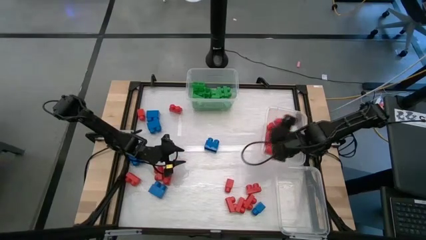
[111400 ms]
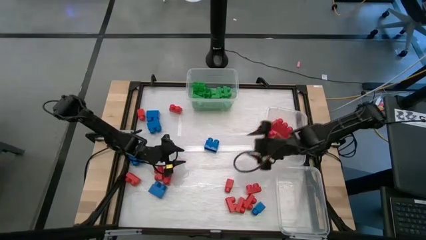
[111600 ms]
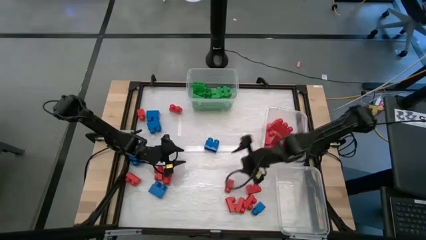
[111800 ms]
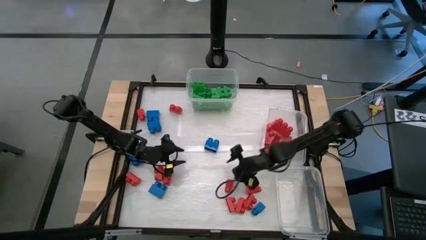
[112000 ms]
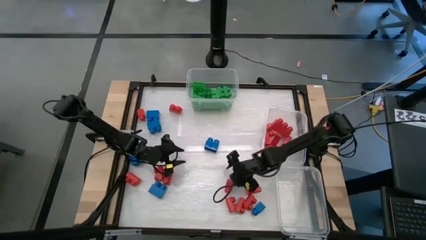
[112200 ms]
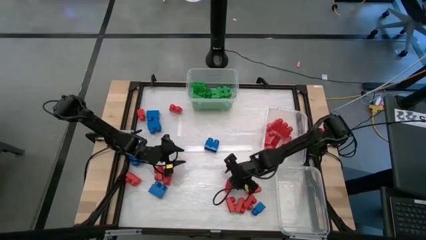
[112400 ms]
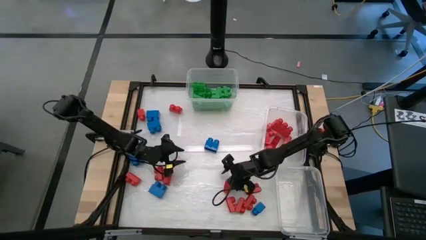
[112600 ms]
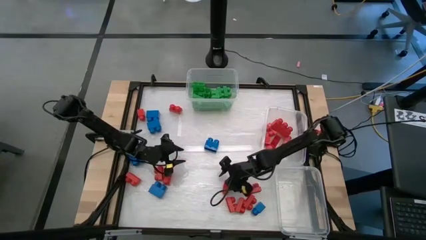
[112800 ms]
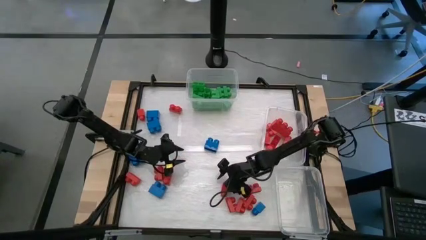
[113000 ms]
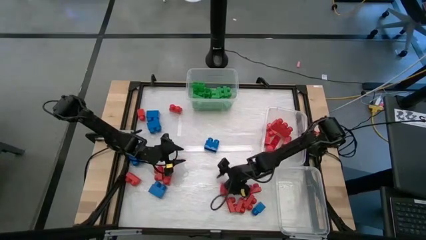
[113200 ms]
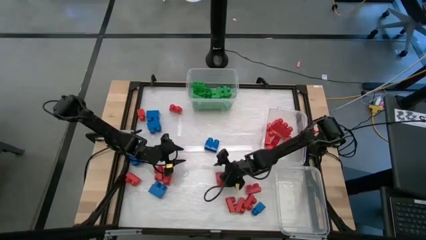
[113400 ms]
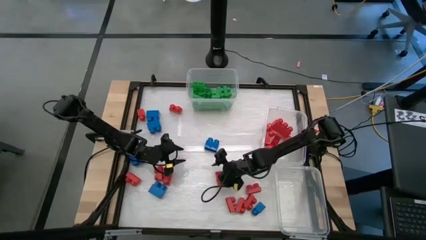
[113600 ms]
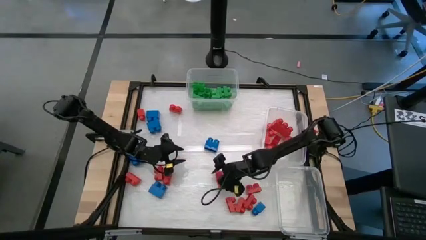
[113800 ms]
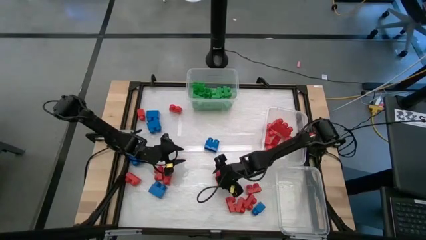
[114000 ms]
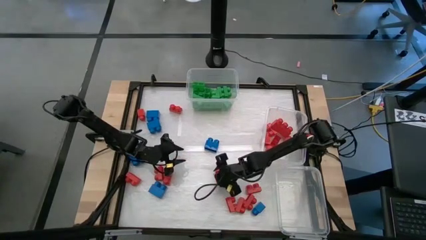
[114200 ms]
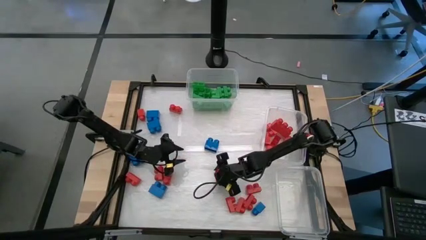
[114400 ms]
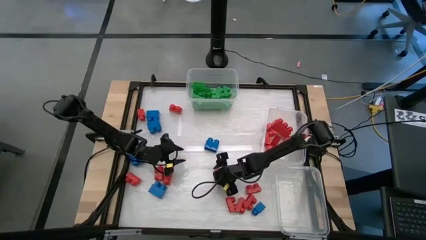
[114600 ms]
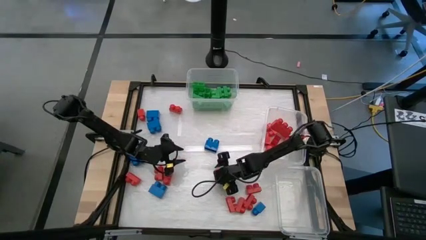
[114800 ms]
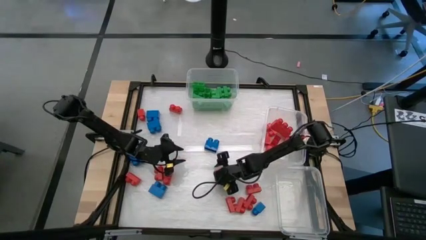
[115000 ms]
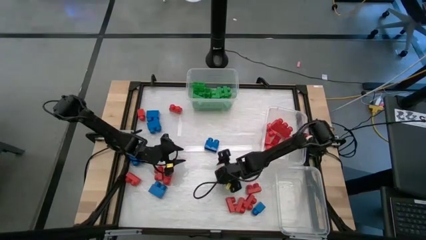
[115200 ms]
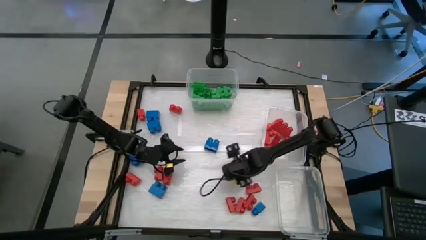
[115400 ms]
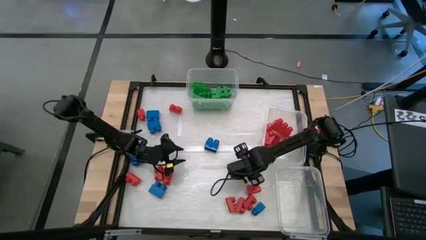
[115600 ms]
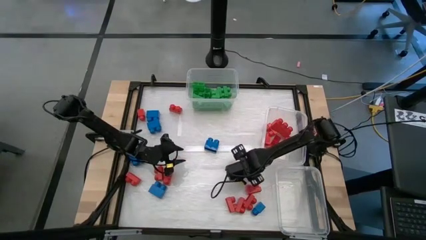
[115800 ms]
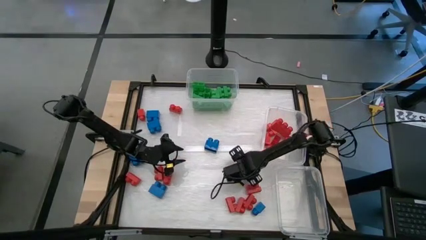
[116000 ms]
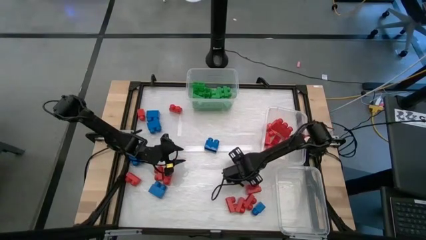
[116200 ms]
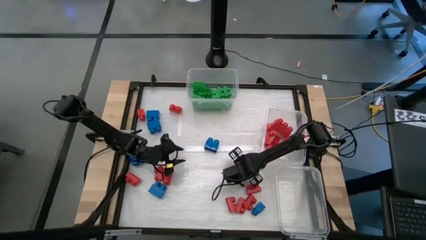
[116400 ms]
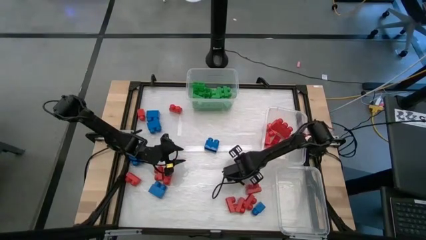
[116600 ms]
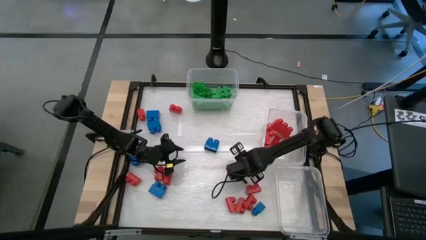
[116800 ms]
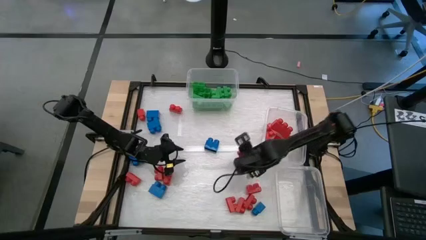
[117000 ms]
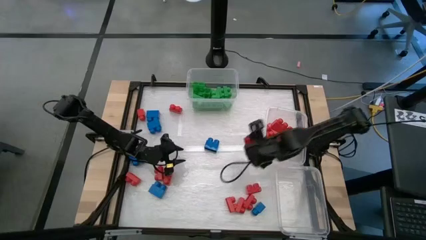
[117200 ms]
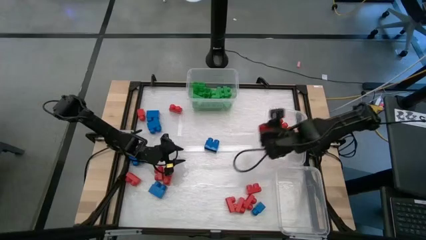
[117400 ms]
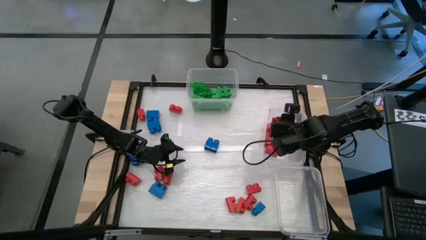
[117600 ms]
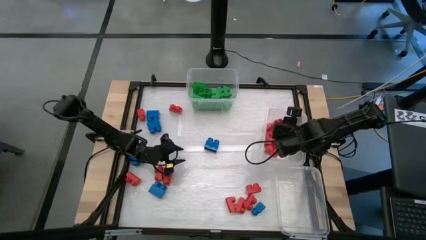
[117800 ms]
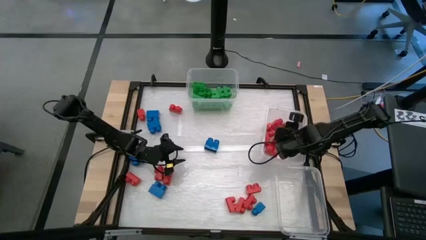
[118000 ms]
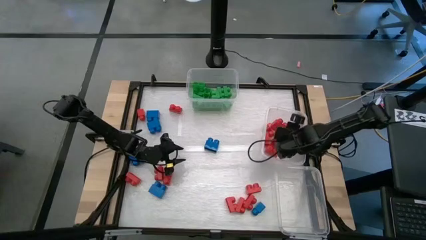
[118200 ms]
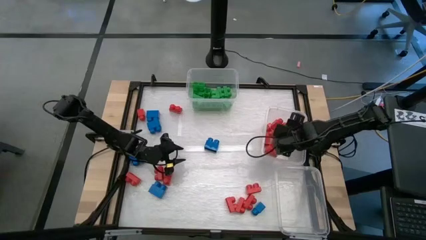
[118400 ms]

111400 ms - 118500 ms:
Task: Sort blocks
Put the red game piece into the middle right transparent bin

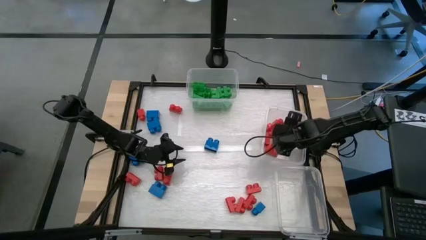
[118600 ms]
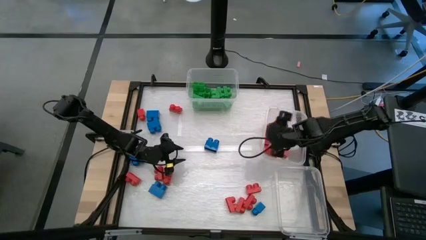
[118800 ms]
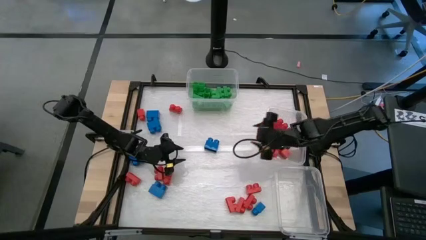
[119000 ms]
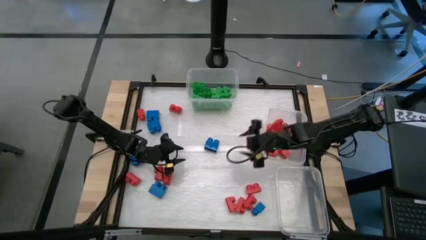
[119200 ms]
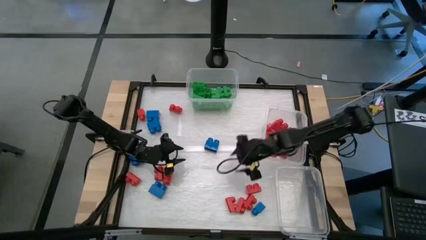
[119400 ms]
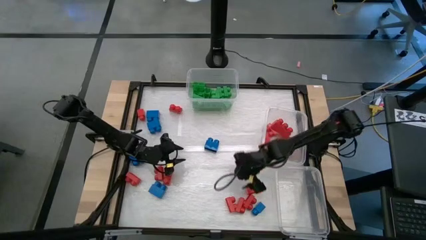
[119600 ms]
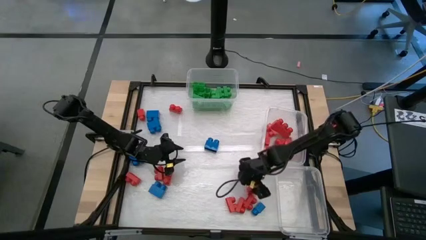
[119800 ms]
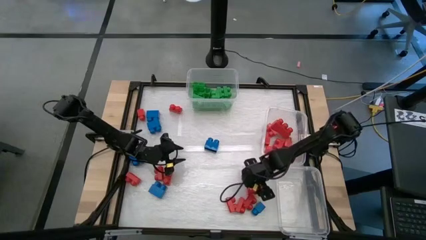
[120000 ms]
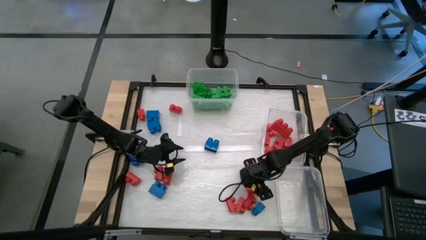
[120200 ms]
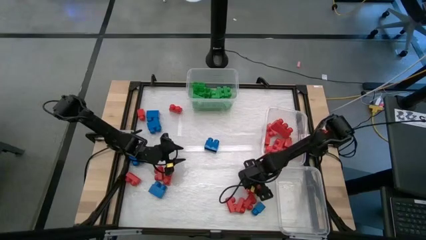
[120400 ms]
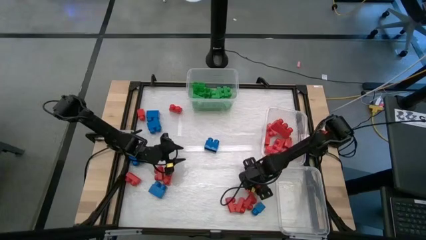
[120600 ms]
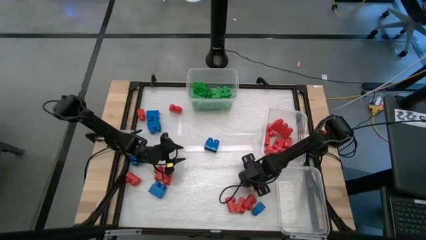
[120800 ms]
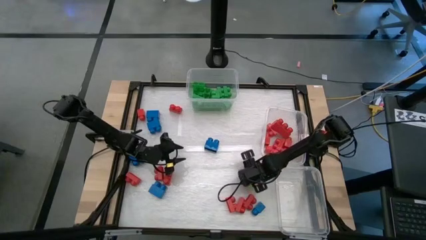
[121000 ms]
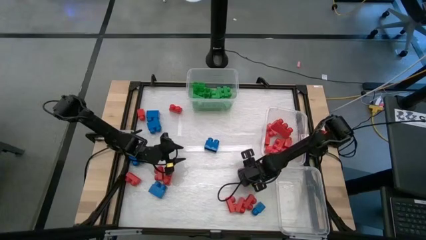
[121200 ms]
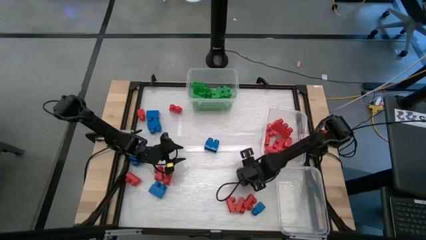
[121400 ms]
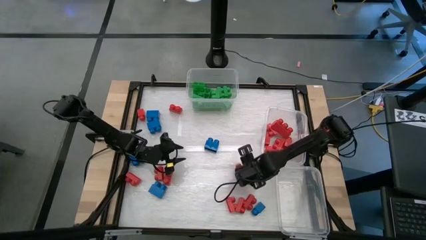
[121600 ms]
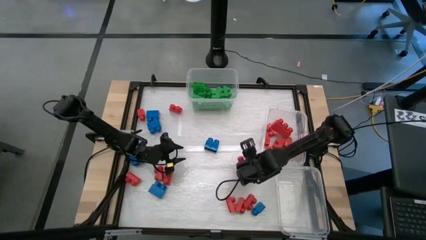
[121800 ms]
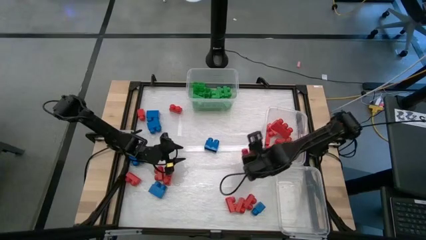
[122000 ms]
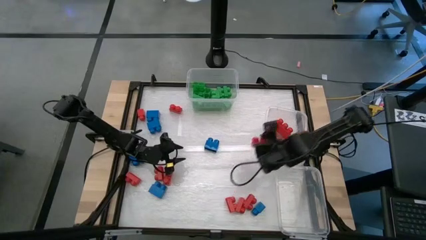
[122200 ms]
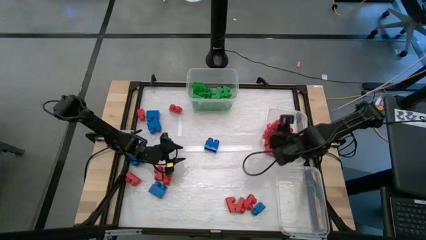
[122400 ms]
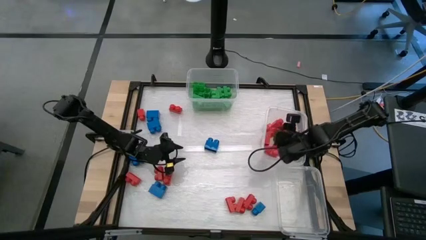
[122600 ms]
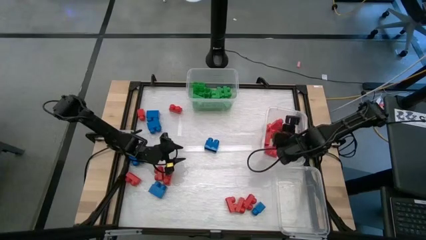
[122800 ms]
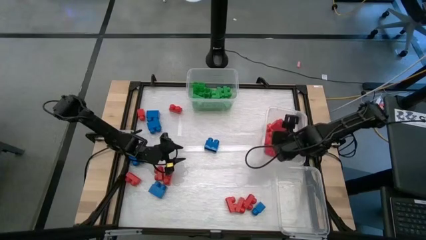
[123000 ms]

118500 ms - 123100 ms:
Put the red game piece into the middle right transparent bin

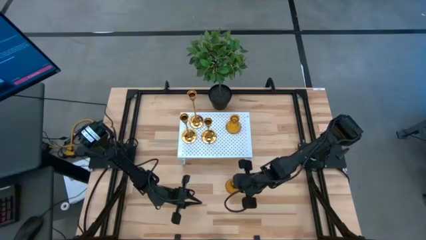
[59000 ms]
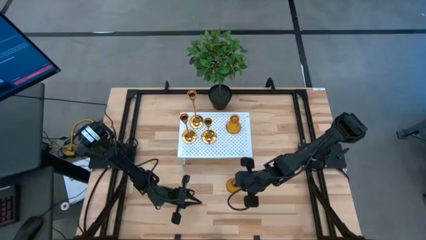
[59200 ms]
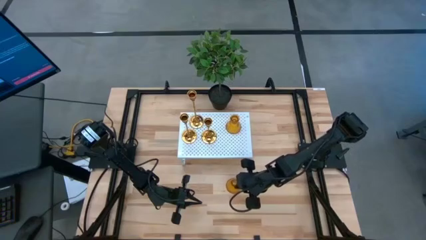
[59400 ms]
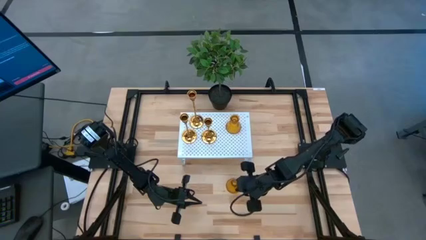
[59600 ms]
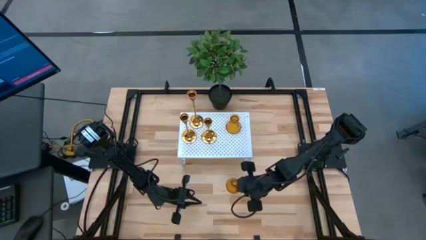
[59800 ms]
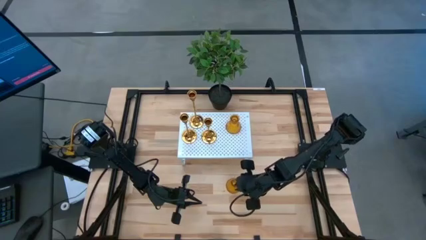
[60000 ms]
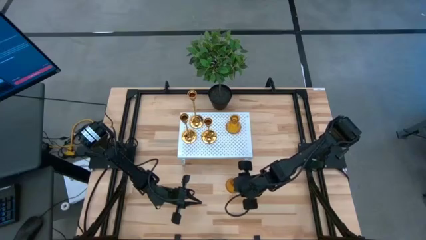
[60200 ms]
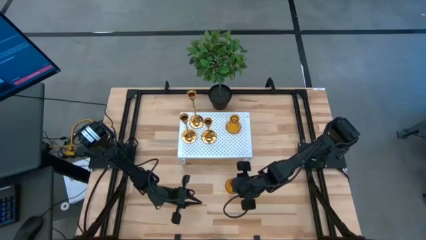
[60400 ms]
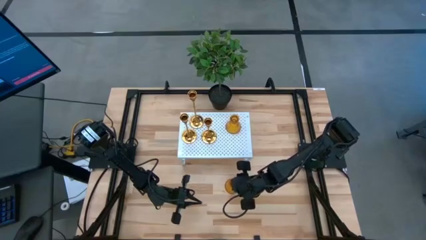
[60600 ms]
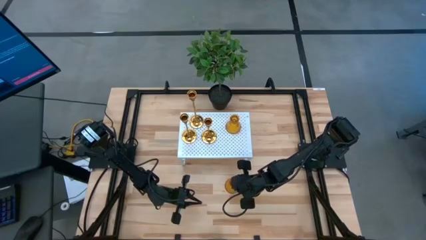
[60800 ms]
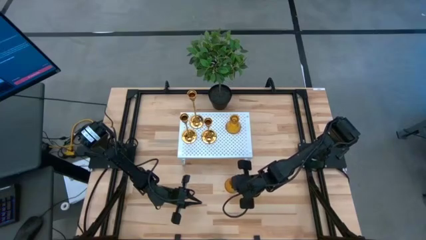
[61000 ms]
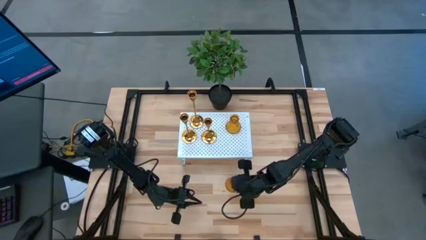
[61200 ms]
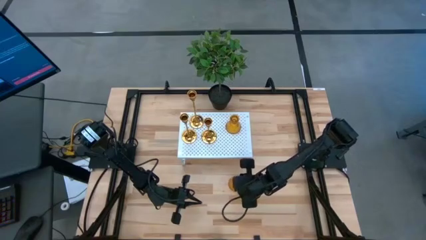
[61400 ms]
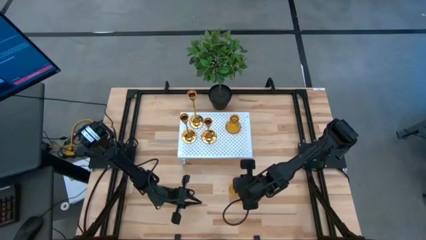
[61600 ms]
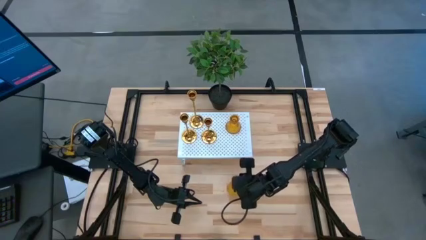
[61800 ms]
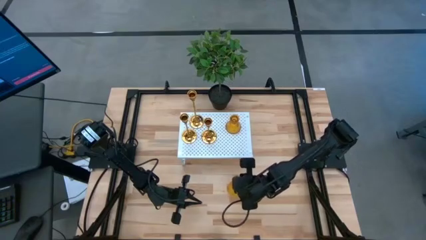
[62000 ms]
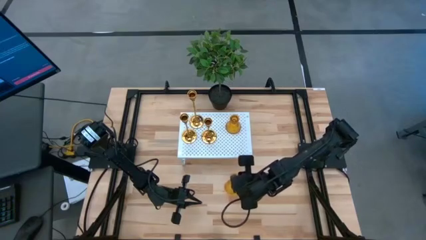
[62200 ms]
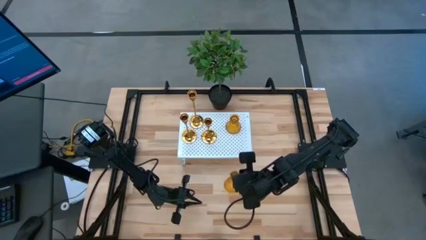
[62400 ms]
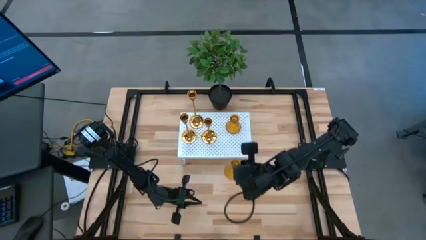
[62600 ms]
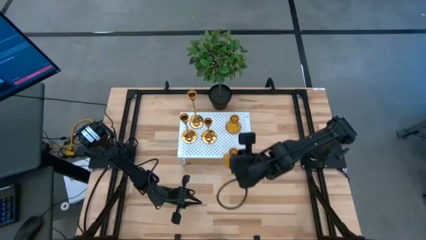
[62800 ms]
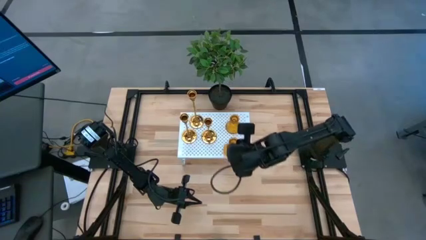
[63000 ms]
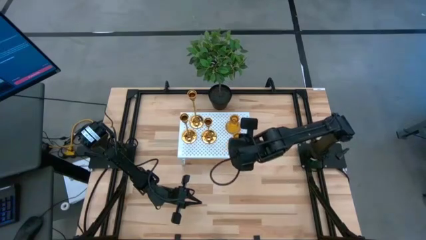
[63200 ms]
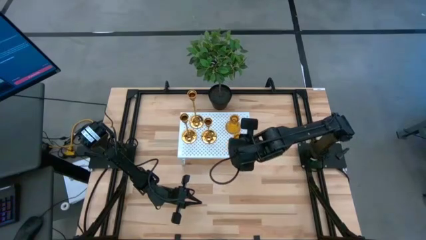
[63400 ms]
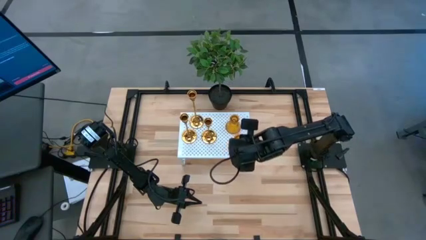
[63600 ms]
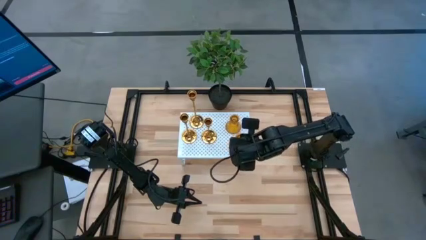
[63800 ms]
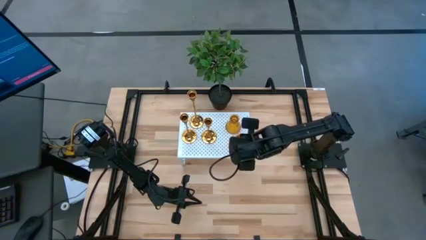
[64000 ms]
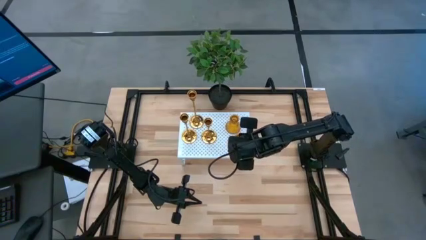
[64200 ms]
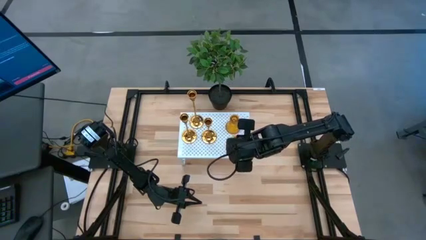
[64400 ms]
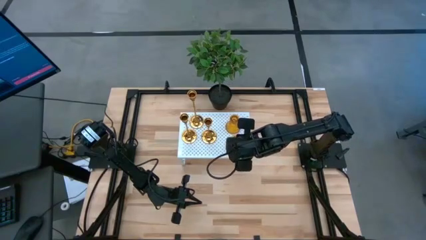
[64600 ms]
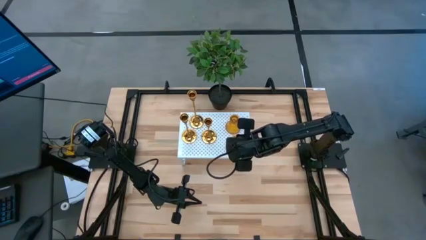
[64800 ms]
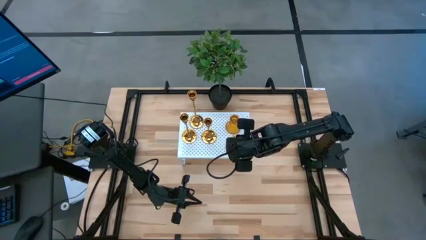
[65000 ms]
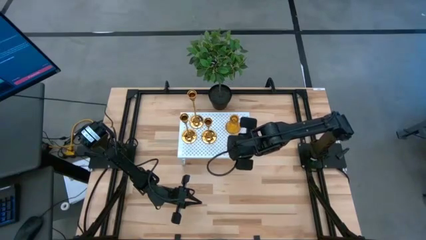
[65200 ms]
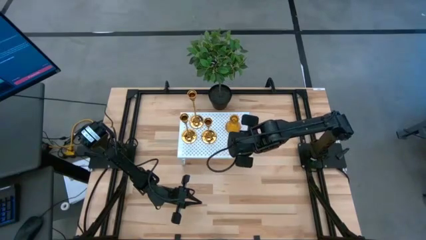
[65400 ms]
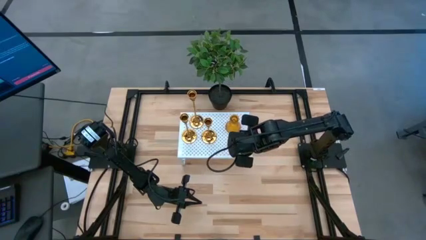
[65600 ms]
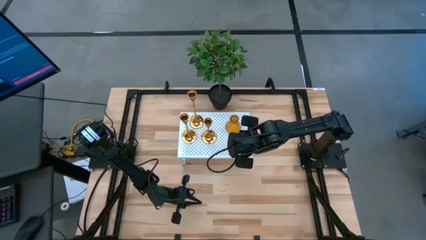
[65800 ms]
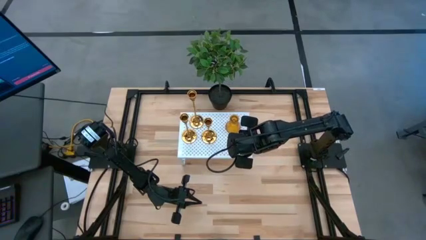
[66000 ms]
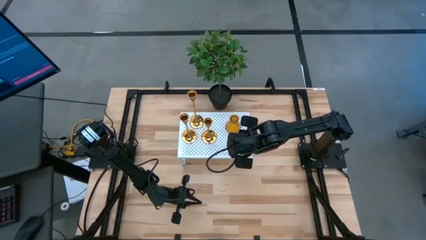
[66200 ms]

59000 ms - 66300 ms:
Task: Pick & Place candle stick holders
Put the brown candle holder on the shelf
